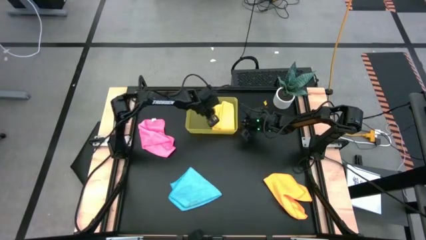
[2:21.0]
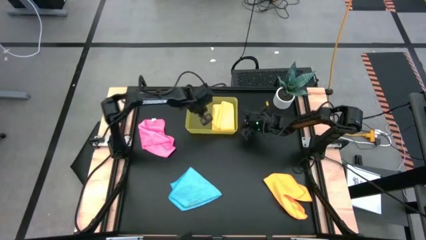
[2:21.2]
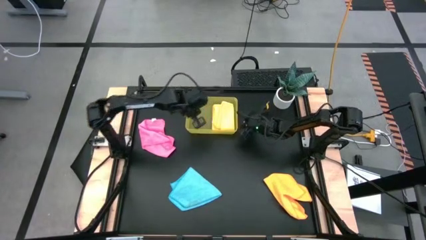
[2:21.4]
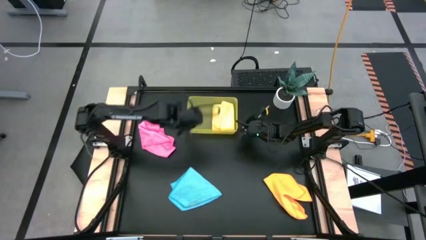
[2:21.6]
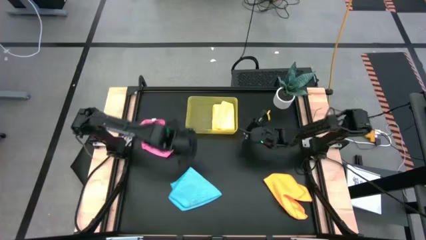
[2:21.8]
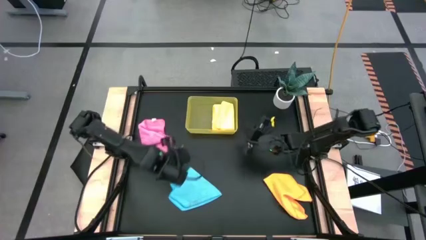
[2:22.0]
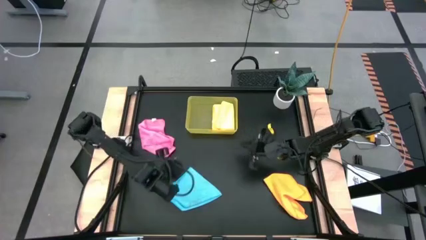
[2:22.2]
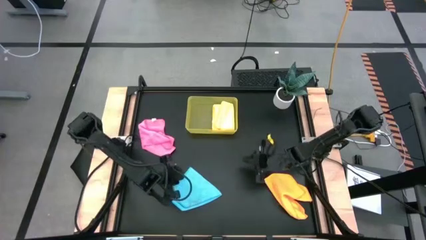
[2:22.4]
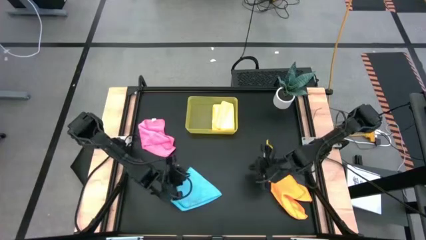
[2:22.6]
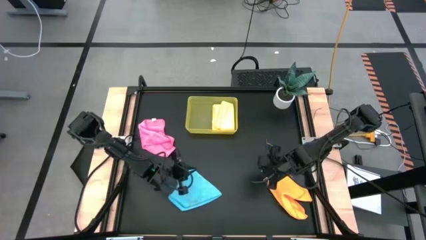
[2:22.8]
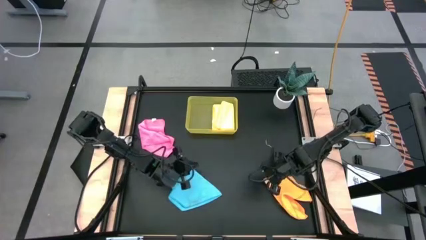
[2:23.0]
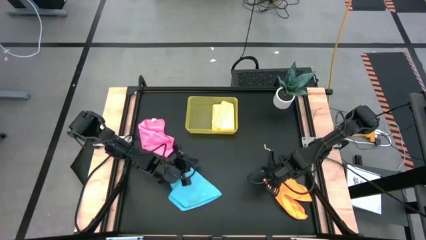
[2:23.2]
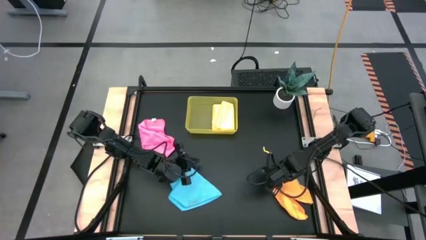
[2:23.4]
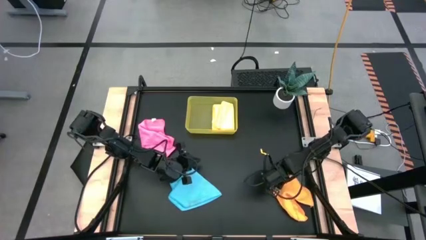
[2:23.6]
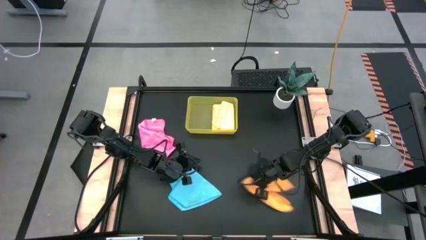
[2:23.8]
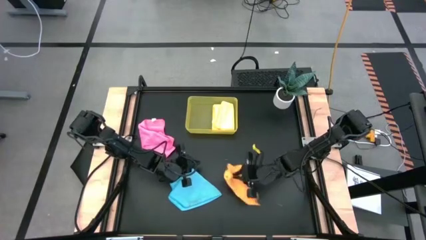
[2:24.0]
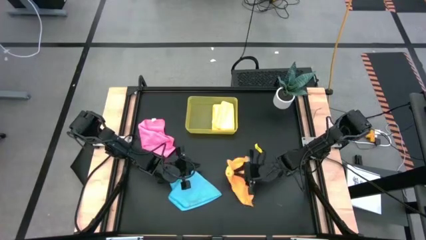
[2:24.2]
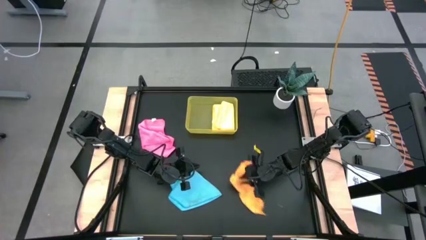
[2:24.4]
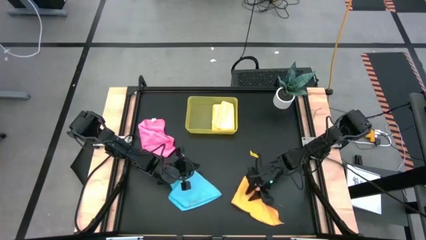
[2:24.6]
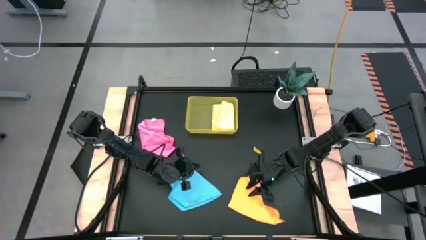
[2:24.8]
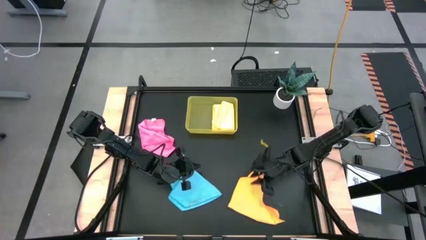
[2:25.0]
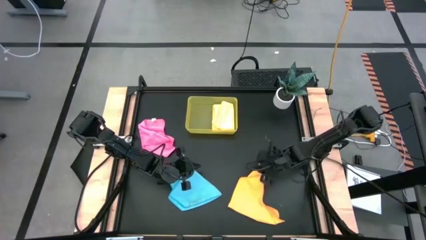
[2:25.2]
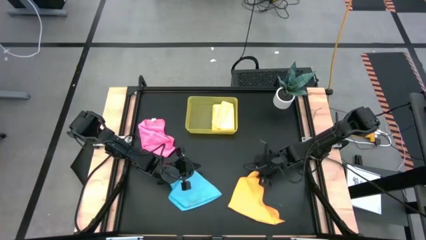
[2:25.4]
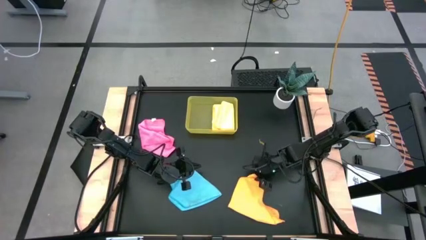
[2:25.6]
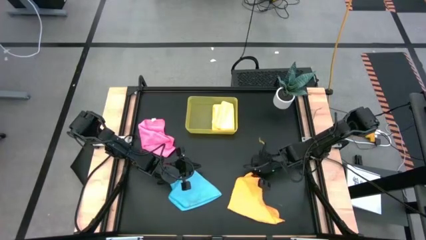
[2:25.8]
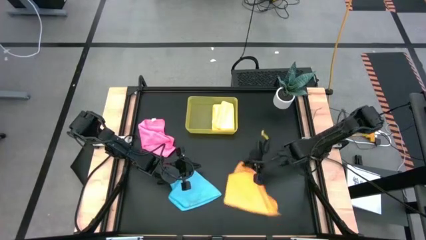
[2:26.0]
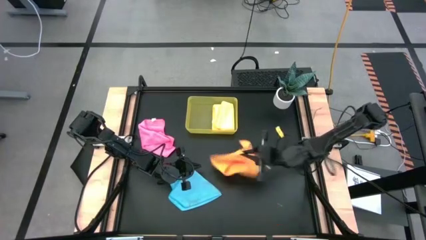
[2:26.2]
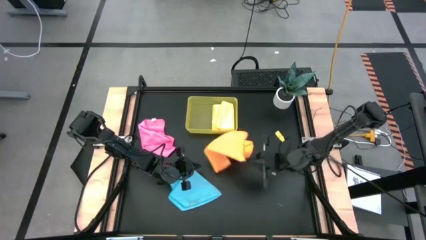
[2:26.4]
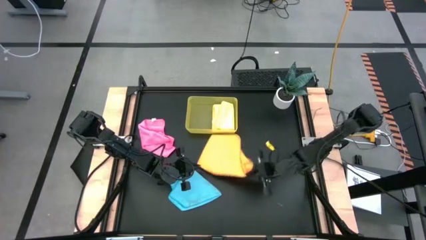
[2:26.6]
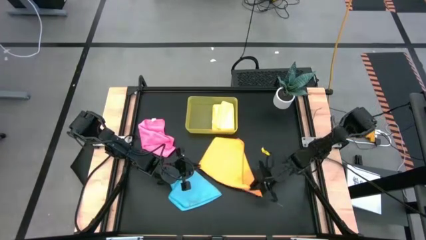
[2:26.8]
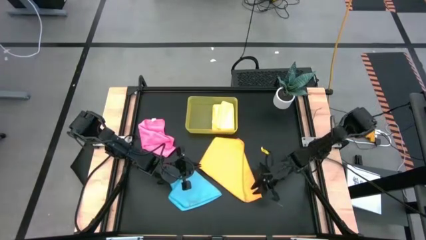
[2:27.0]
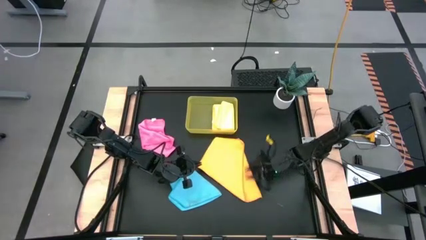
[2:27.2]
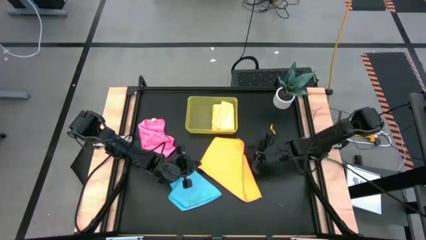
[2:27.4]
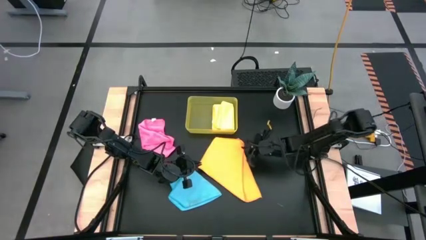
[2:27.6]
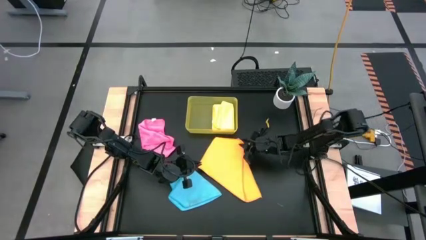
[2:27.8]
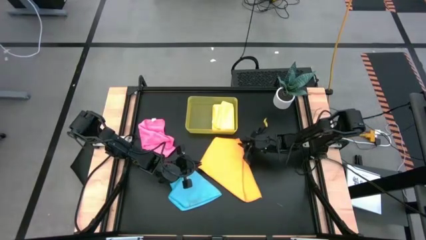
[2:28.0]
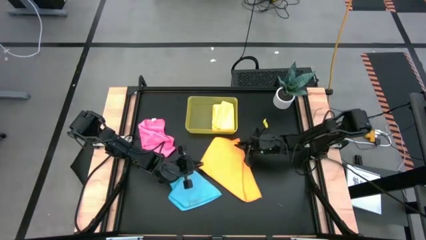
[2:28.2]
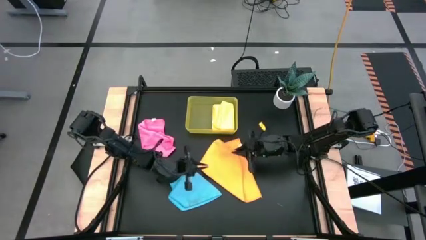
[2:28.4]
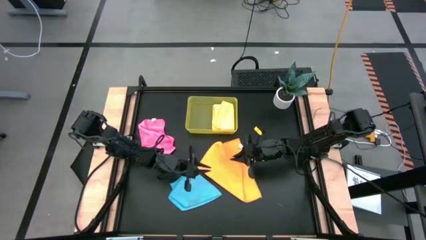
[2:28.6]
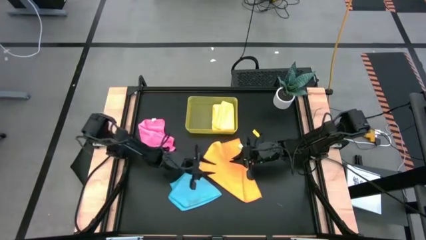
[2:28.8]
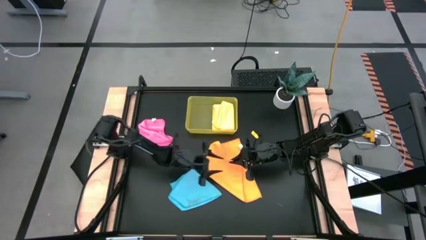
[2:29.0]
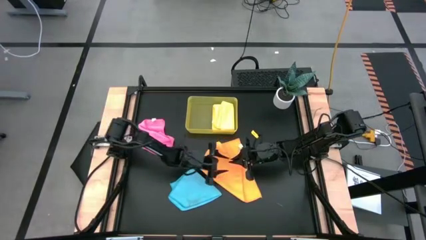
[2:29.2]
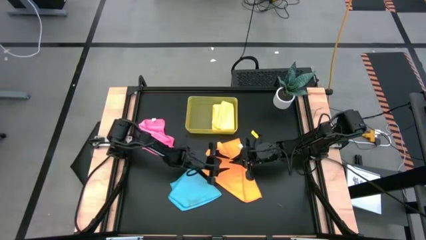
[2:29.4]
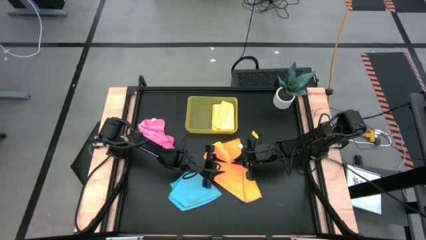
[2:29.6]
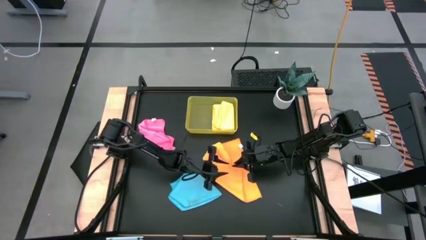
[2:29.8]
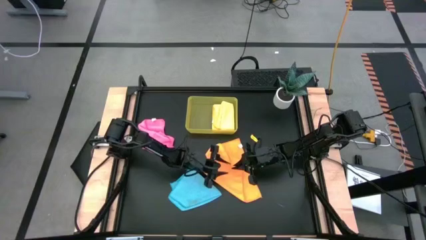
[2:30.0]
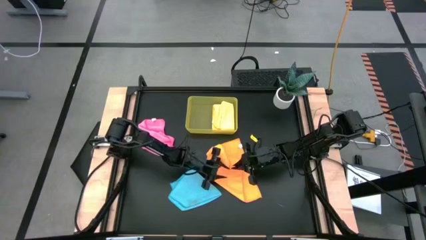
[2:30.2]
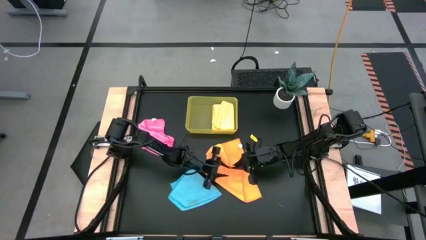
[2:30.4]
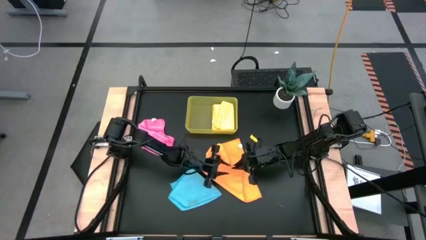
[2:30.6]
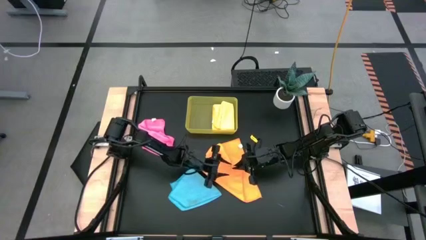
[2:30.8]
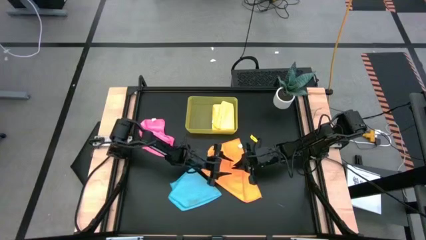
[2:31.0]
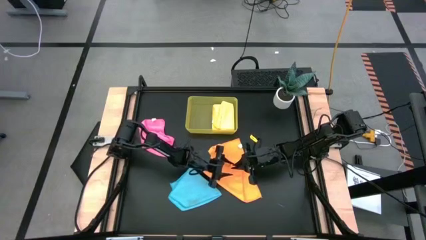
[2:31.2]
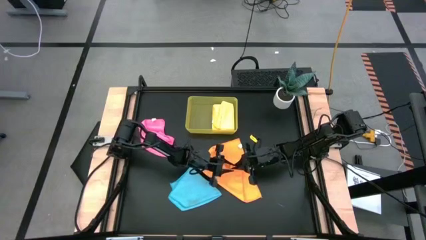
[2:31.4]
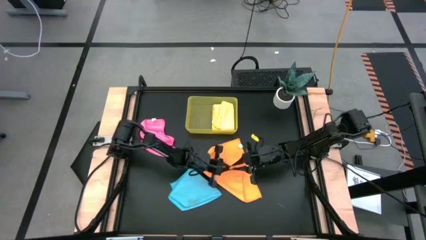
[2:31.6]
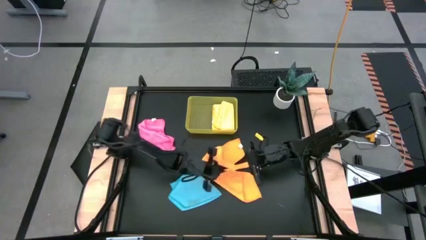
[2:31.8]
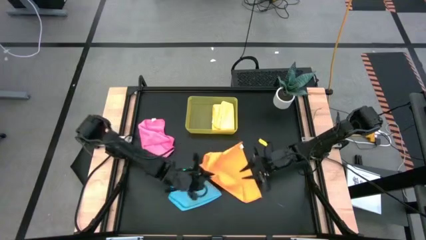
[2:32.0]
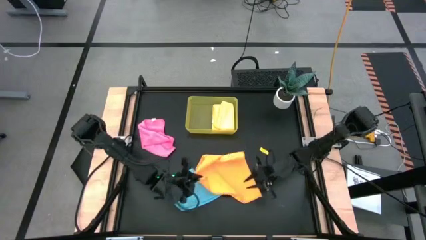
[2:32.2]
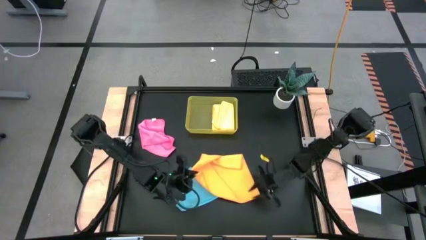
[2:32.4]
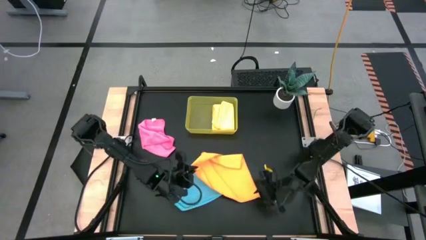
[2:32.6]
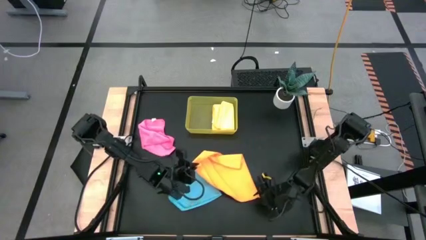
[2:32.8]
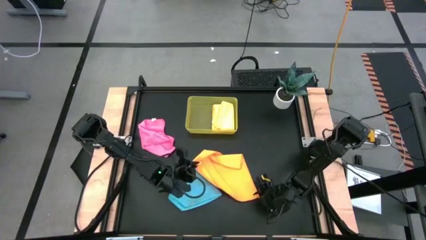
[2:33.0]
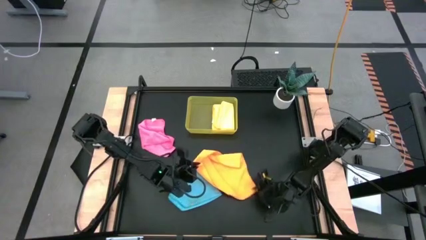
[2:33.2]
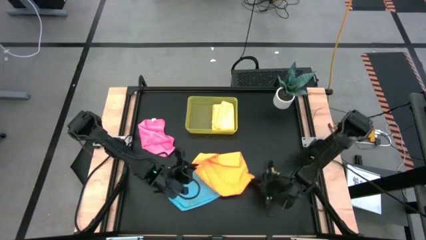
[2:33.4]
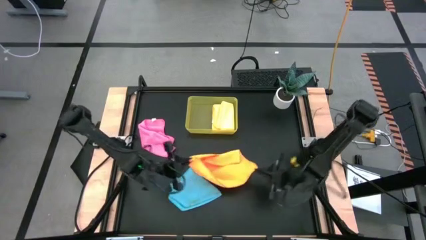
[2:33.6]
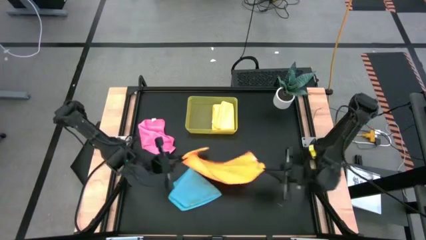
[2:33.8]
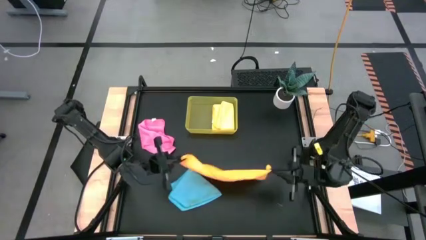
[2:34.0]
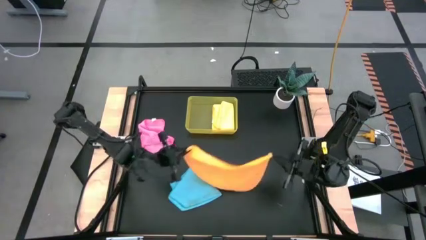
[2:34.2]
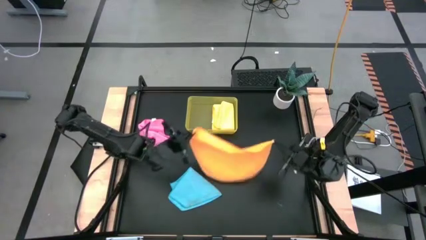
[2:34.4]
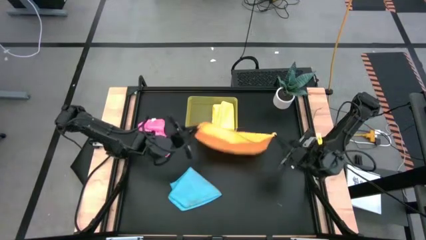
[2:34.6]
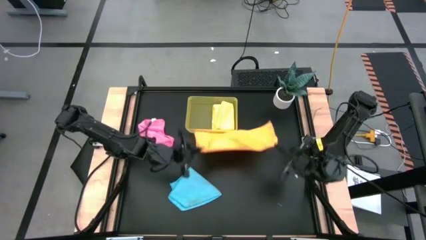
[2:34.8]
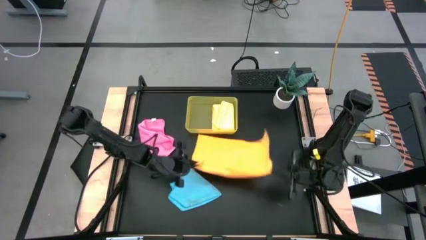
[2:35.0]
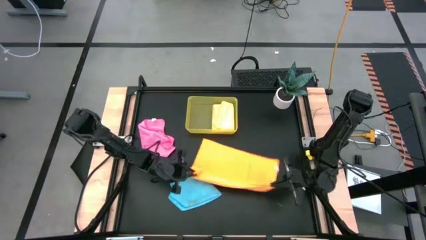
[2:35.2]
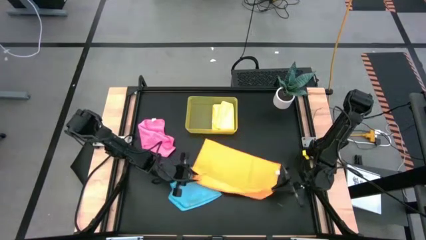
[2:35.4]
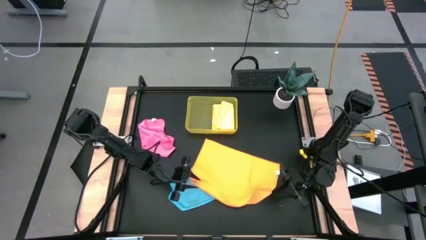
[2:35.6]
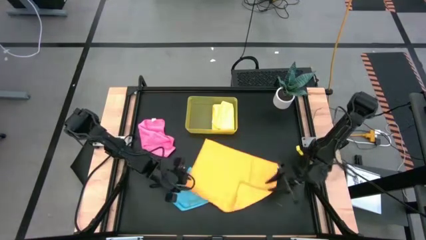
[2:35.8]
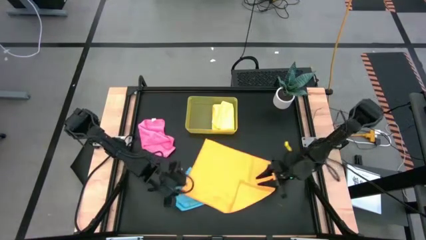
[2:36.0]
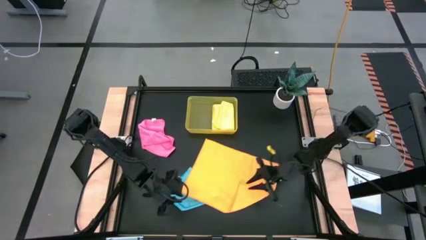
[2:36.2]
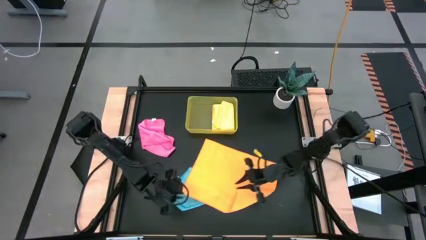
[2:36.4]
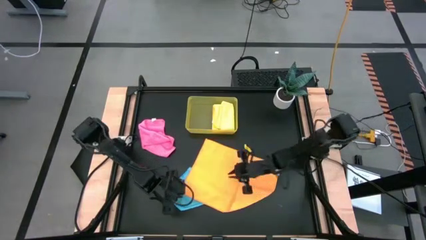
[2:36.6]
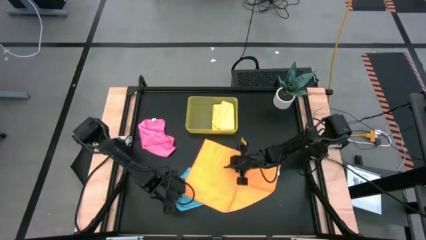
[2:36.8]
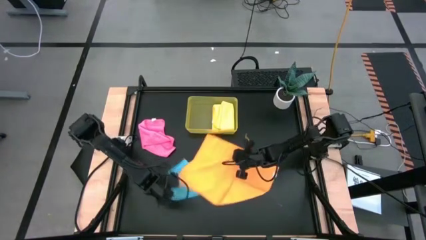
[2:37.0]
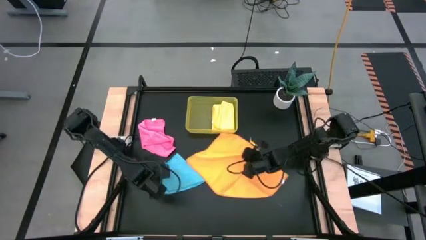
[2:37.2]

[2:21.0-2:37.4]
Task: Fold microfiber towels
Fold the orange microfiber cloth
